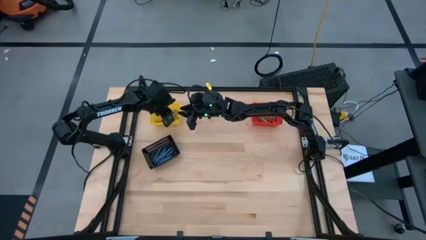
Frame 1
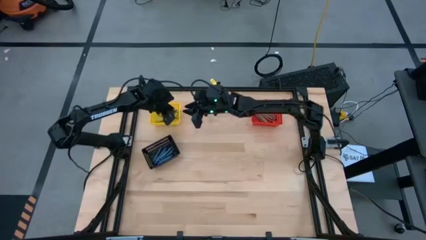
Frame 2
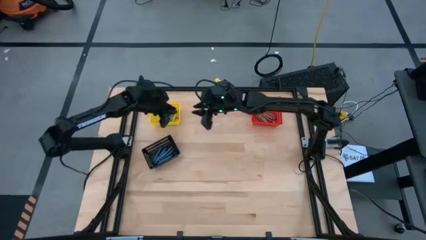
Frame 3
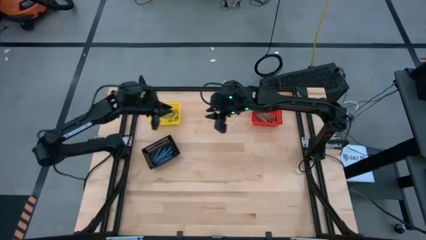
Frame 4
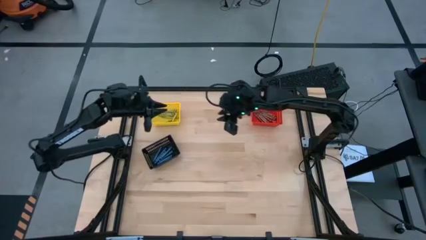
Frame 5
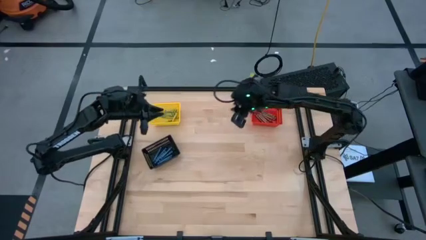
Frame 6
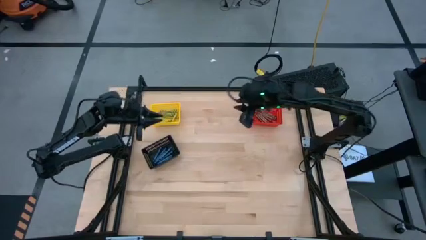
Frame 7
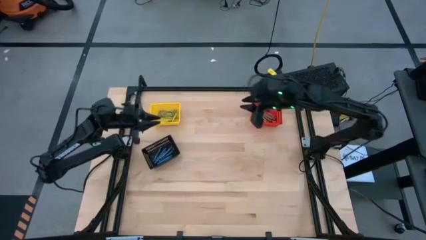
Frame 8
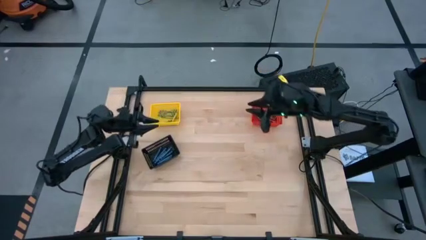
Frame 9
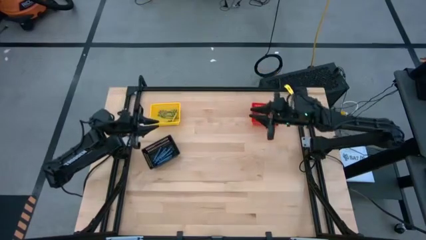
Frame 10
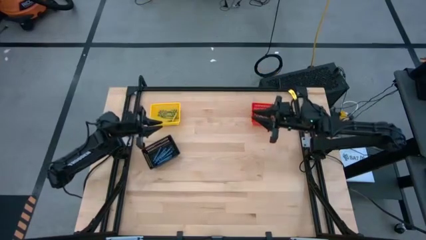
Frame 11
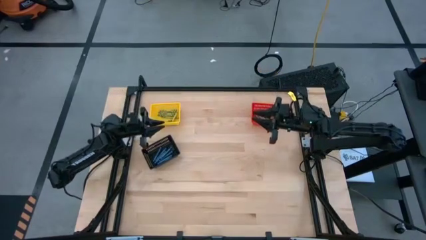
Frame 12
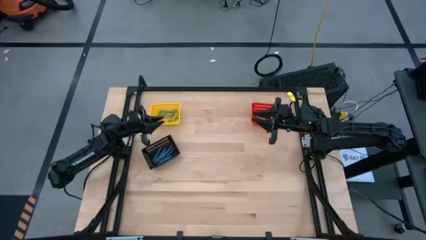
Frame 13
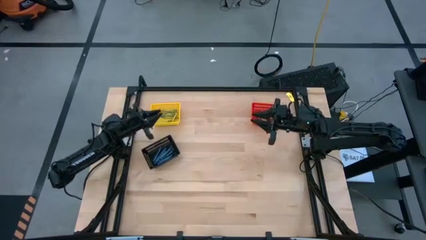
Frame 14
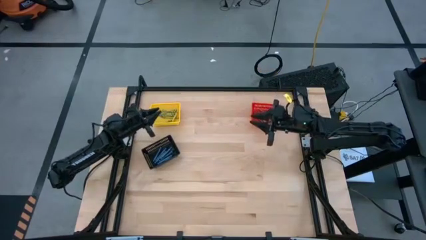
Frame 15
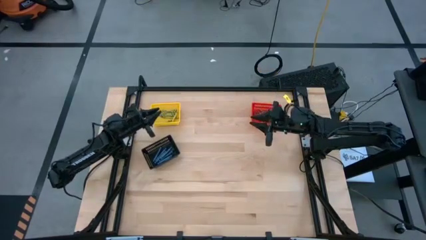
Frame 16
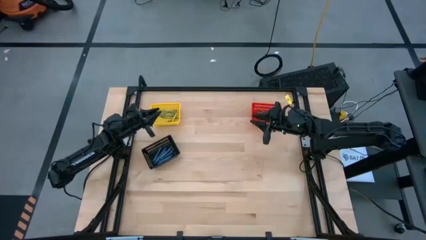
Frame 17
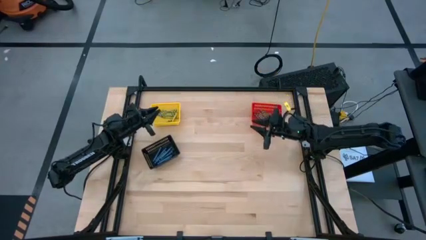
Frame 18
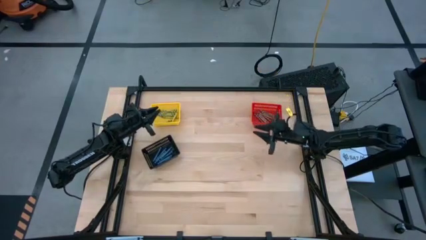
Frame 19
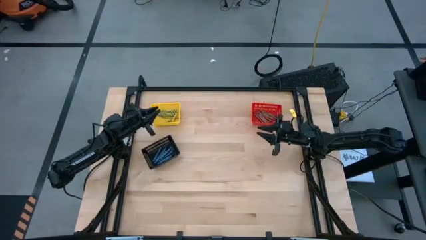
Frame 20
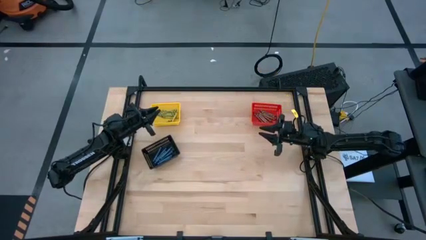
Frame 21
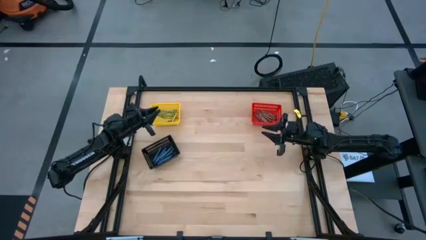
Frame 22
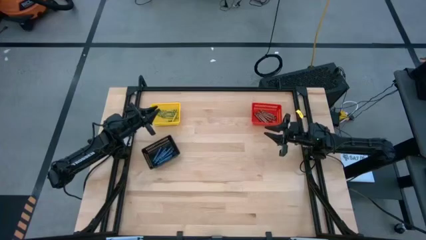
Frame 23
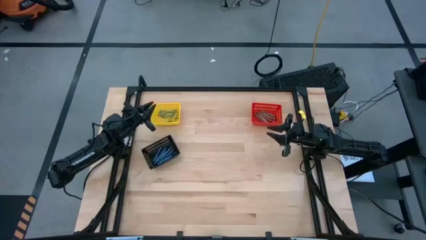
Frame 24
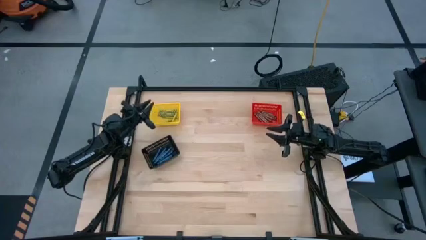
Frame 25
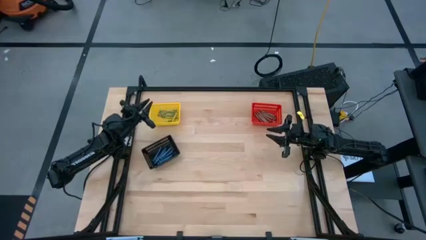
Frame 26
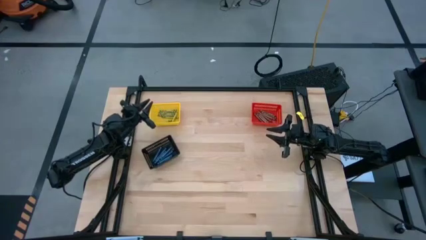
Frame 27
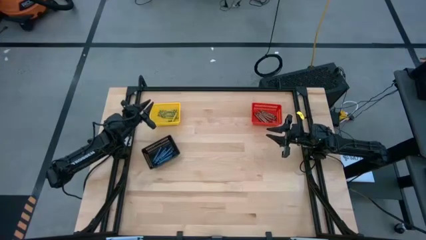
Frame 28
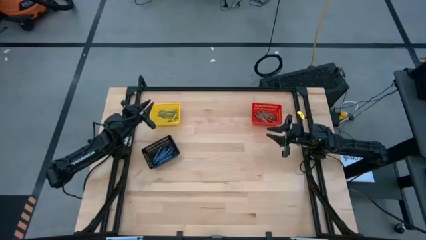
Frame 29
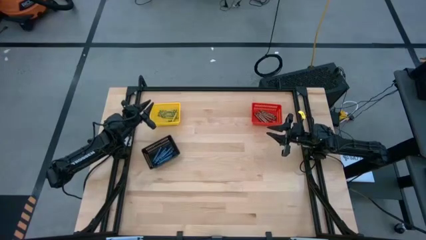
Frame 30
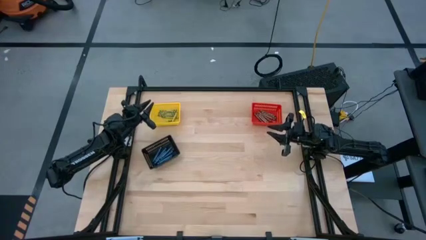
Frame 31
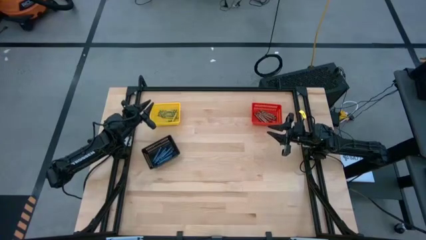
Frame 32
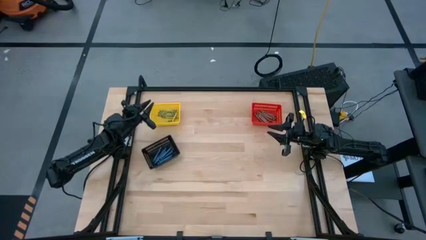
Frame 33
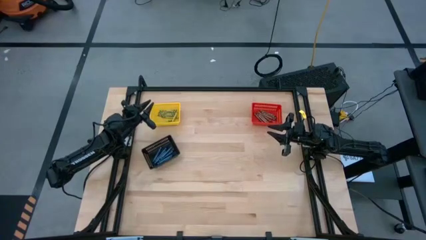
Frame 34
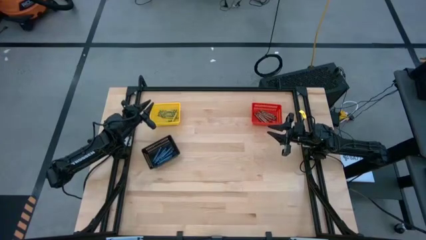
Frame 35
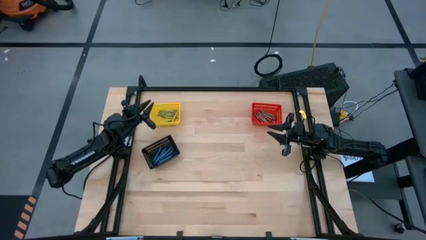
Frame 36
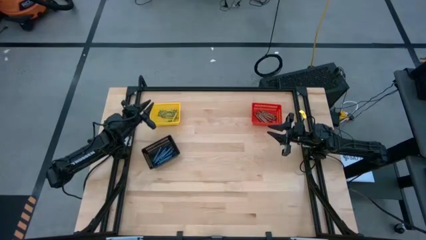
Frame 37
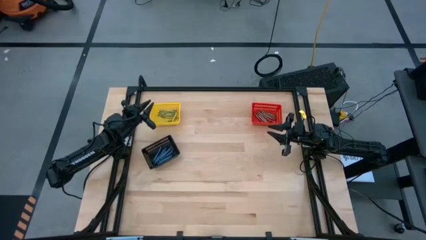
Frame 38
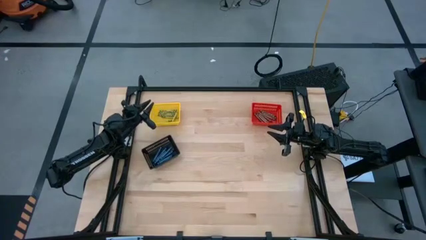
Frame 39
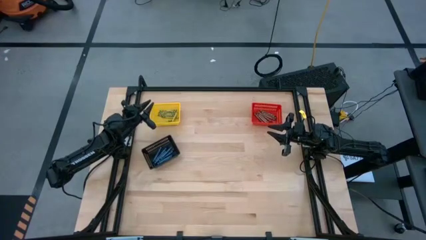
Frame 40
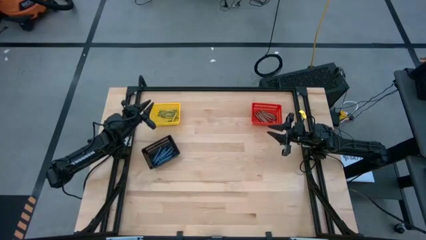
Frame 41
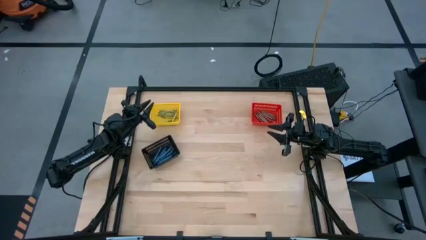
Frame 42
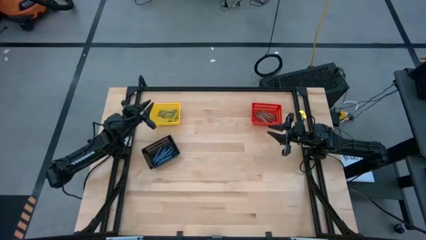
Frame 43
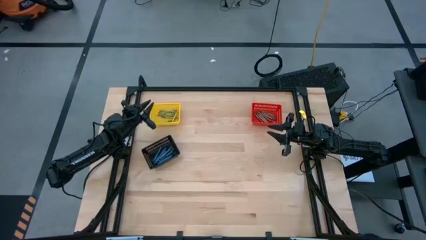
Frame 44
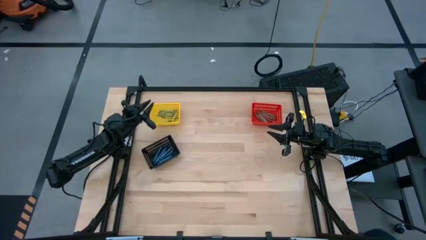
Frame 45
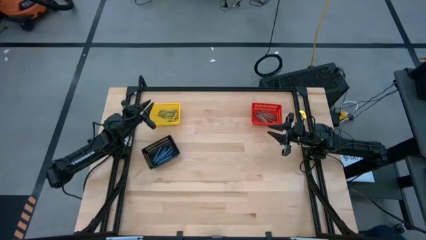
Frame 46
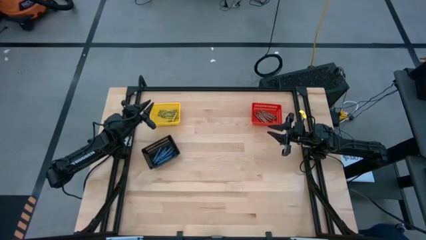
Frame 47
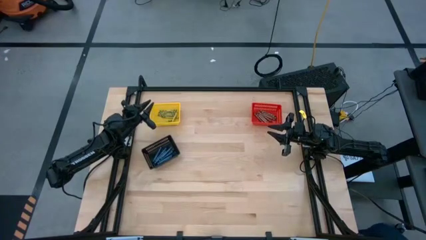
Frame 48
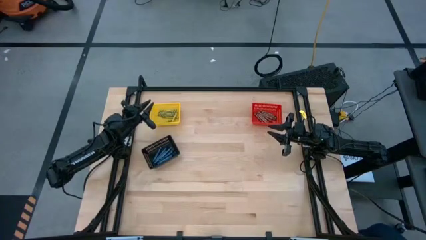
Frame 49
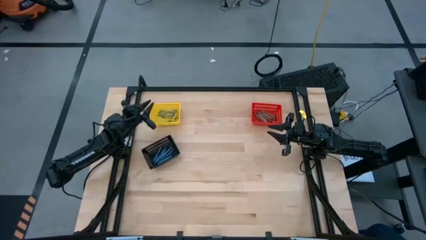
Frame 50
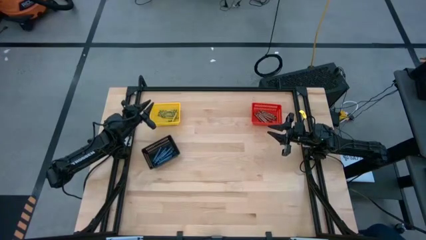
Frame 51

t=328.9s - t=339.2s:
Task: Sort crayons
Return to Home Position
